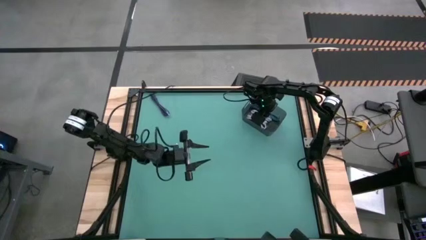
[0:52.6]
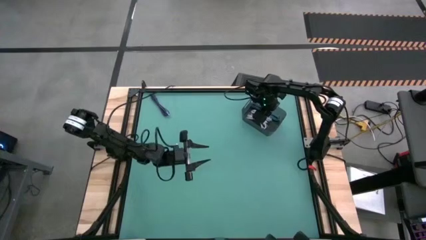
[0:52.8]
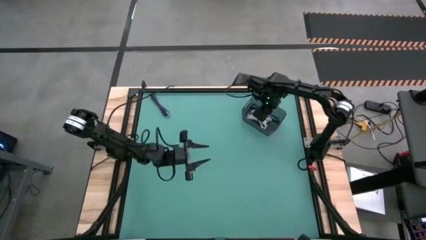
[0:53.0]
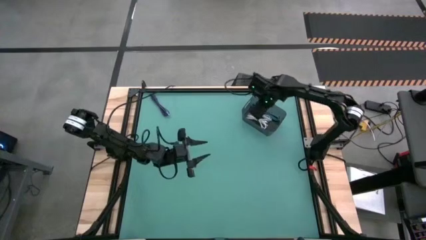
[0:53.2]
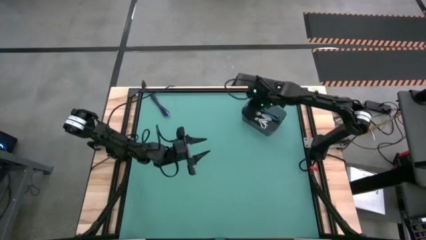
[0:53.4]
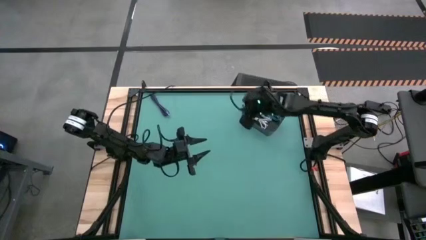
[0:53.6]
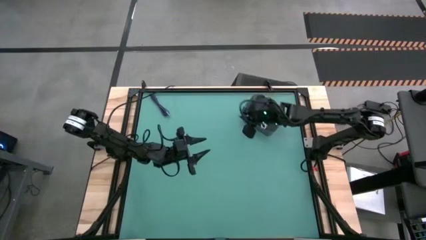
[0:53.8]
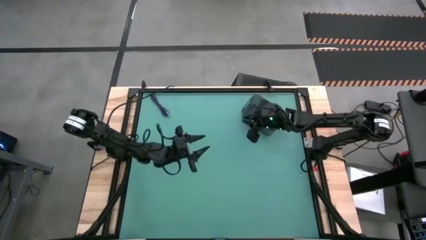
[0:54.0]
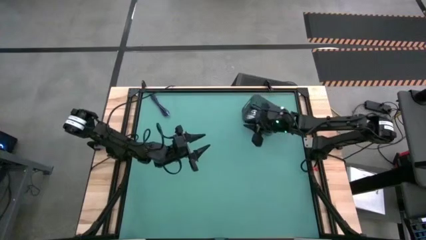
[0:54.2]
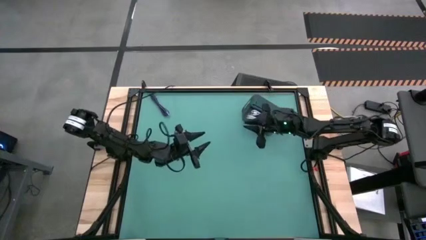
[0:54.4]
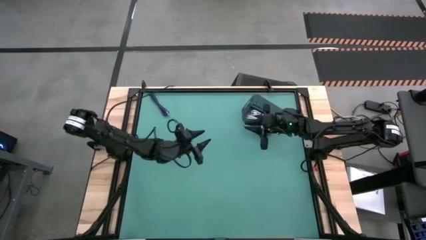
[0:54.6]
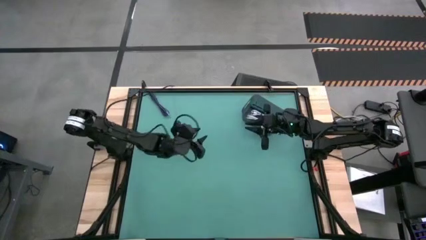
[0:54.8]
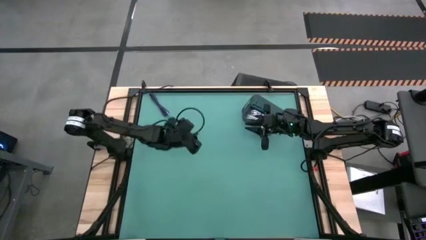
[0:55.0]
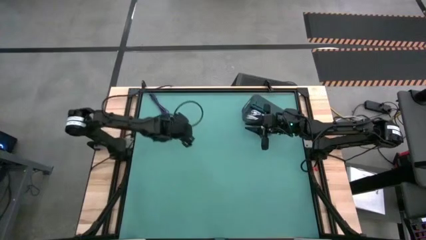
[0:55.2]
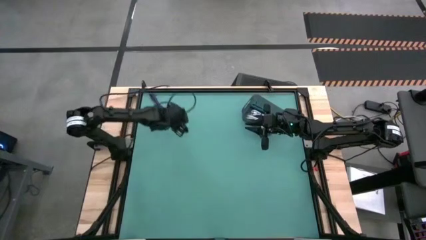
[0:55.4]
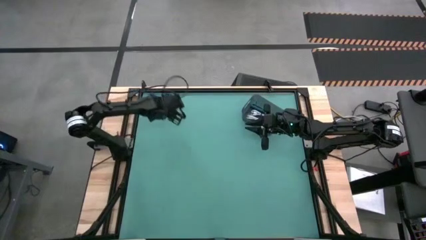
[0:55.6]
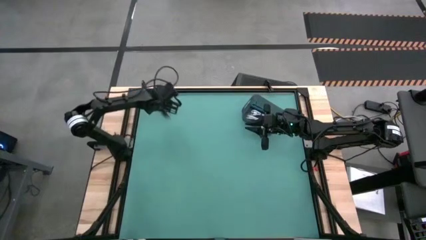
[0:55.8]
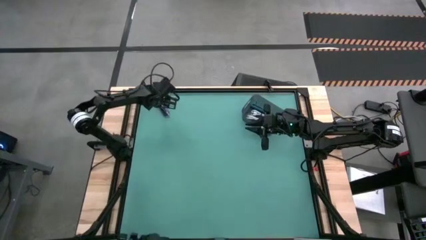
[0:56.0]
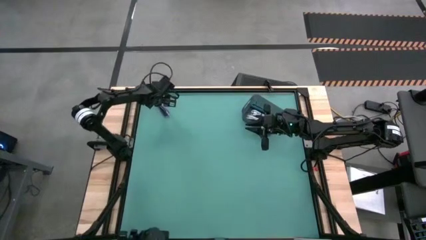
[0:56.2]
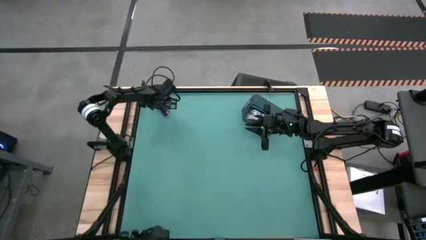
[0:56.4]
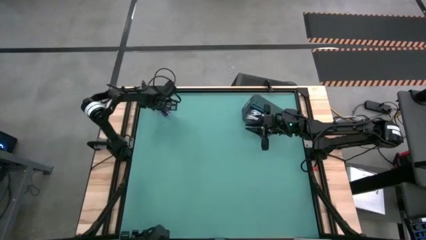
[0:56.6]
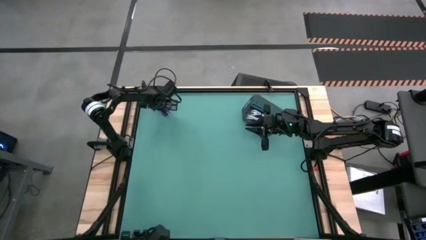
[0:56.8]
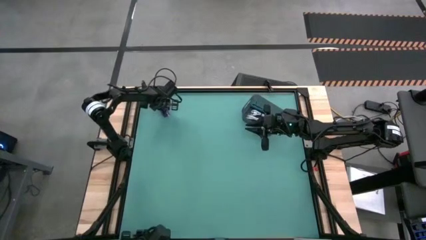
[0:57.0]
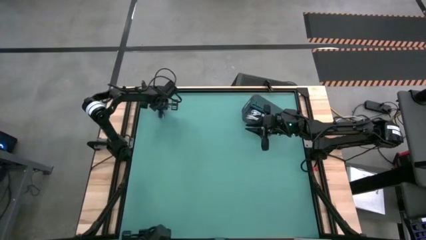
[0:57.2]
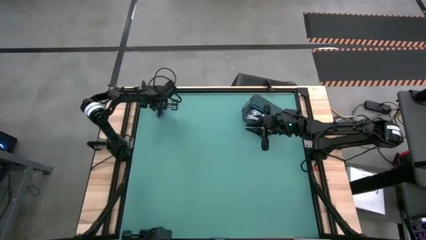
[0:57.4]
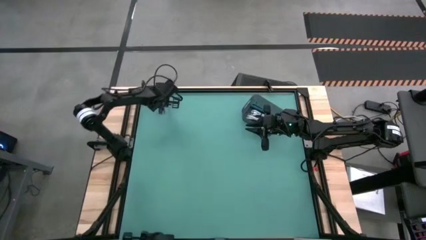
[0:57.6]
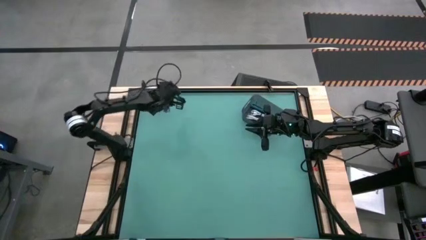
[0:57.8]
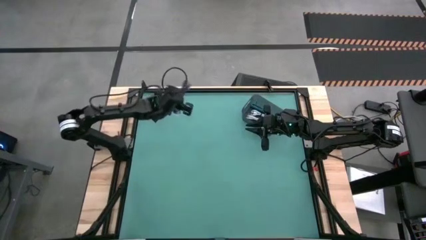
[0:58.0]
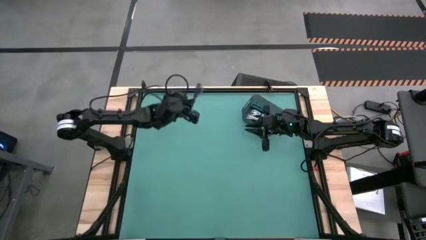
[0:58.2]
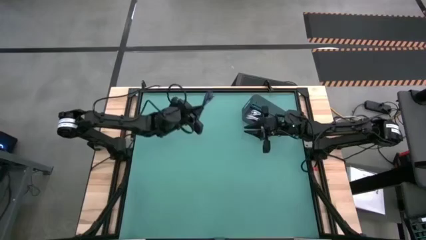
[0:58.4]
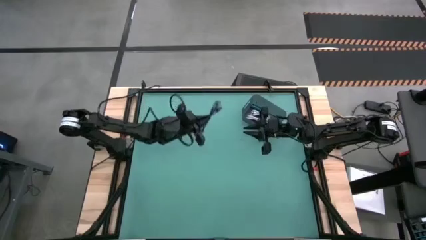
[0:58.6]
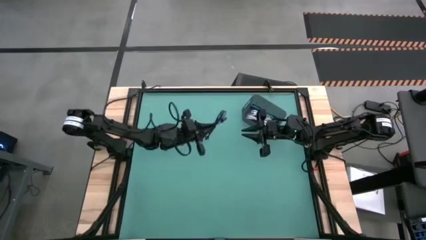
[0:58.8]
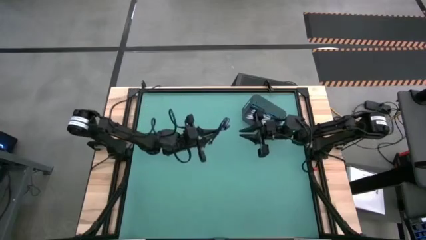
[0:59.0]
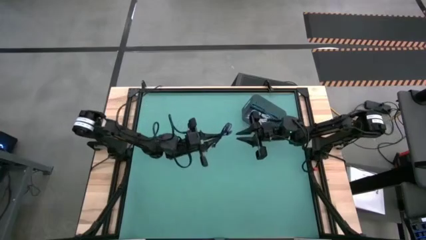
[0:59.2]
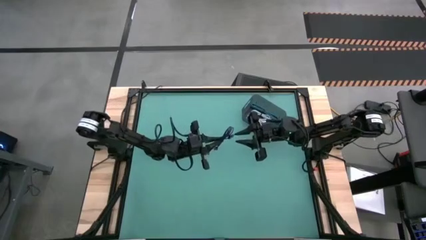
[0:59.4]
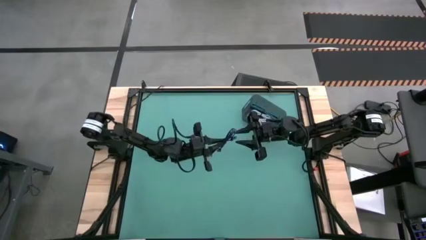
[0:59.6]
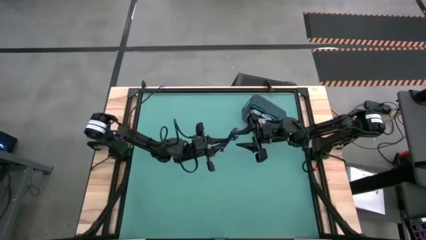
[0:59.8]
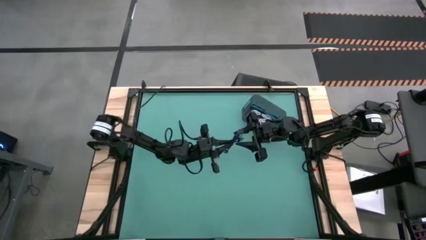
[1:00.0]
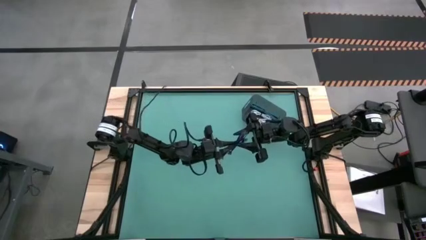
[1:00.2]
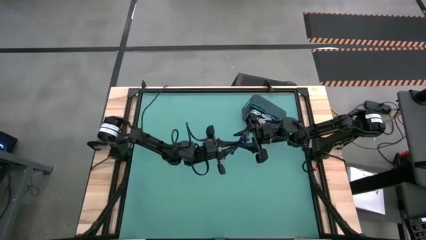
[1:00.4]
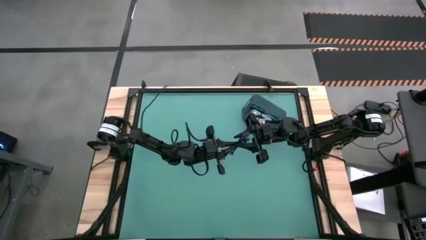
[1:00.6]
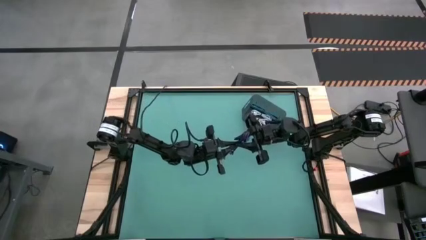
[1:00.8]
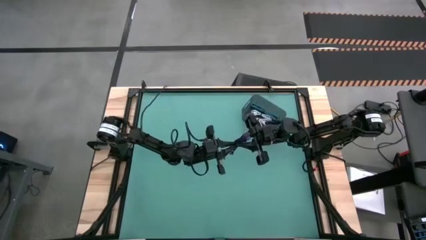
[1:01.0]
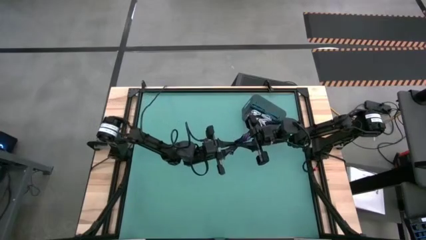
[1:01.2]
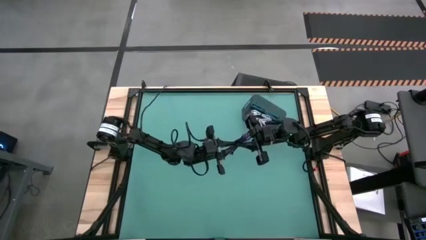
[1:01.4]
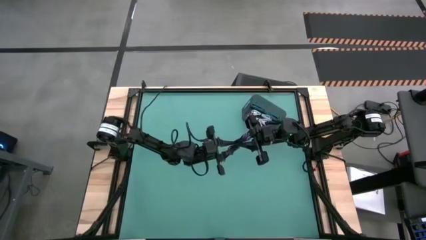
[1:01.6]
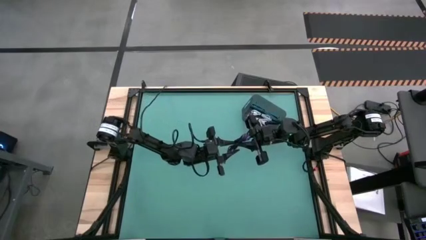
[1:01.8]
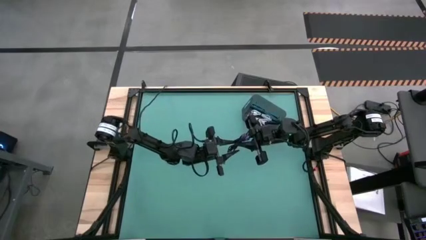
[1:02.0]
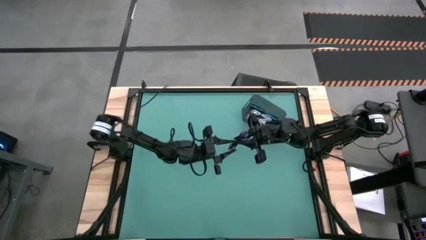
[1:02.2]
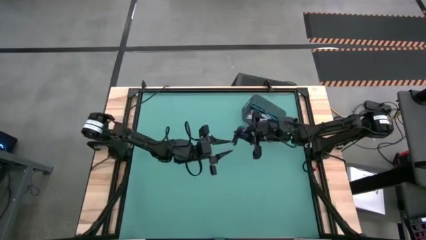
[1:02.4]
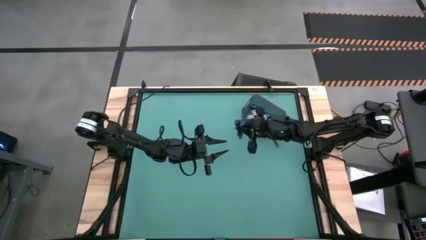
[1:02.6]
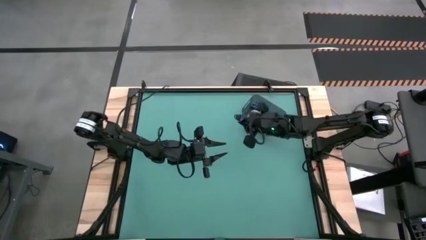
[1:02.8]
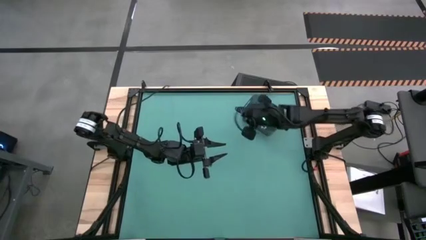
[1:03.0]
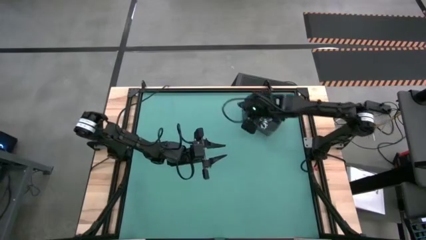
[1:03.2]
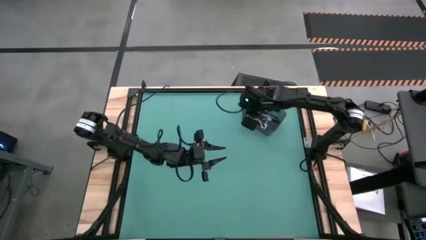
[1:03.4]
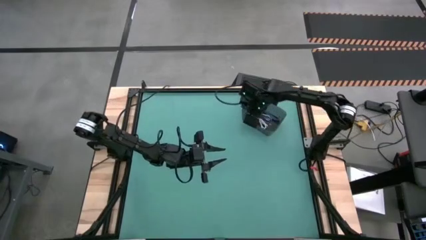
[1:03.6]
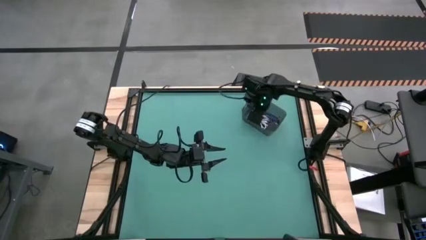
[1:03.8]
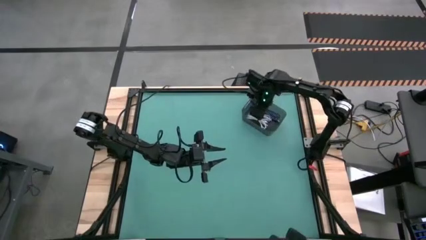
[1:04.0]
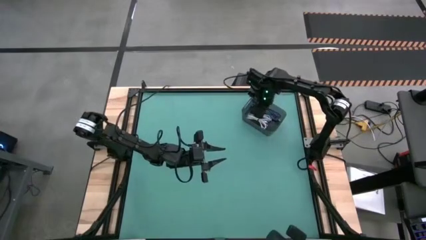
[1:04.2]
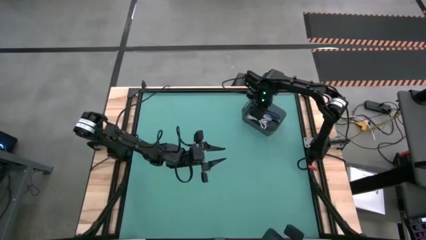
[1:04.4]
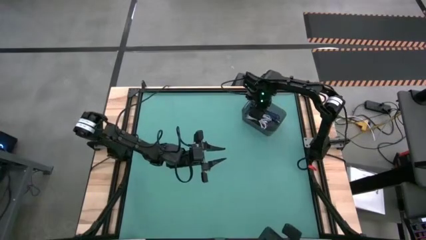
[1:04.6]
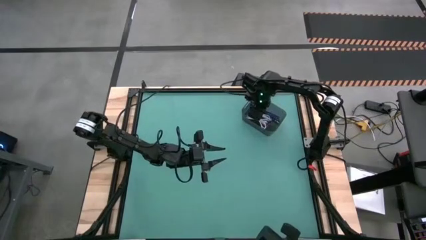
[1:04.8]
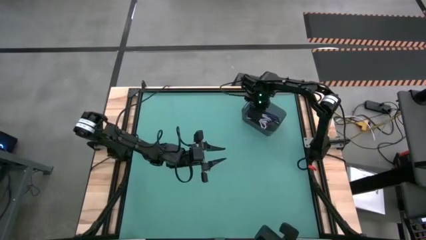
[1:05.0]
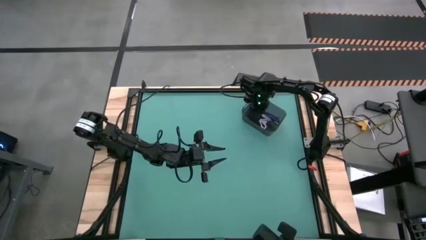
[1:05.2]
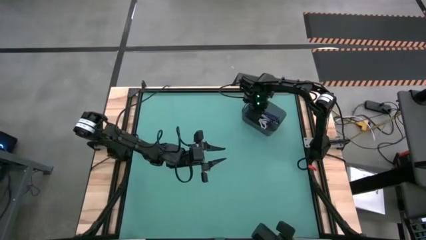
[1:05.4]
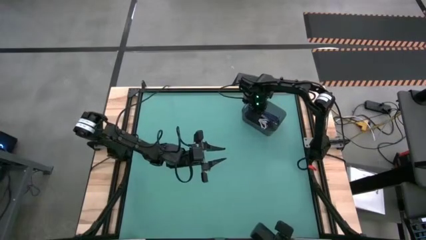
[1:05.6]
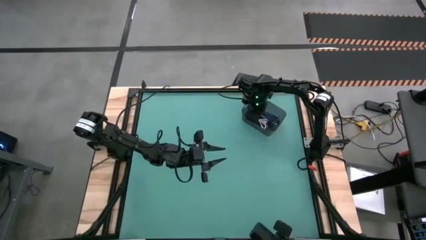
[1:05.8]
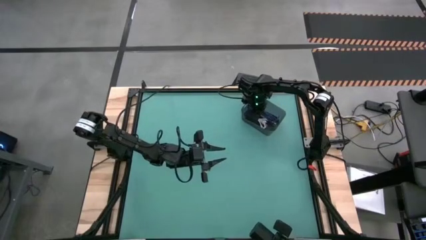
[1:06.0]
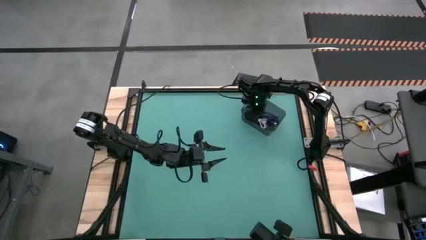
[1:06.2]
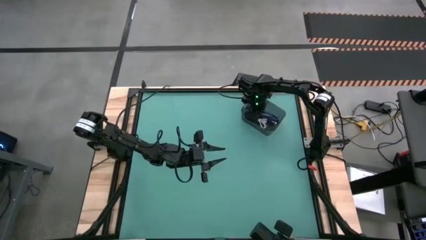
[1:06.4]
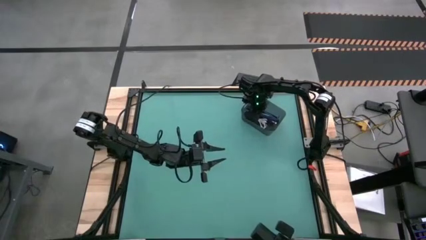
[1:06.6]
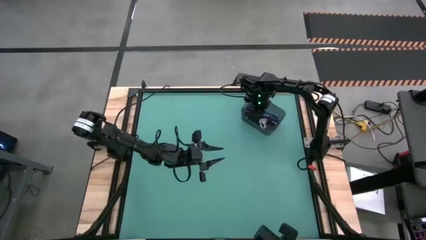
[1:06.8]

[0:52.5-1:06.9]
Task: Pick and place USB-C Cables
Put the violet charger cable into the black container

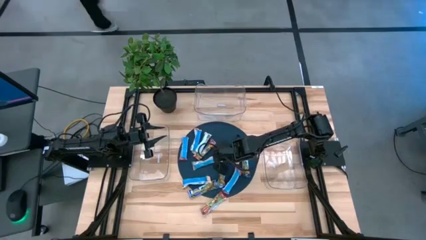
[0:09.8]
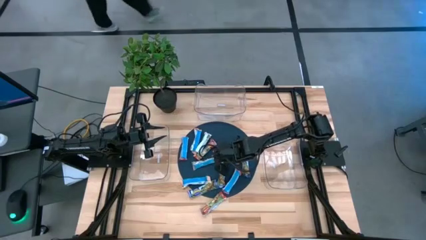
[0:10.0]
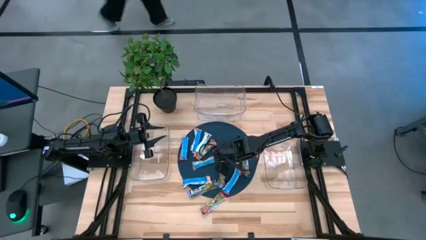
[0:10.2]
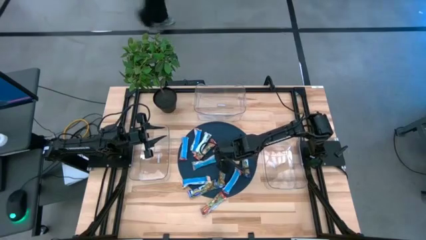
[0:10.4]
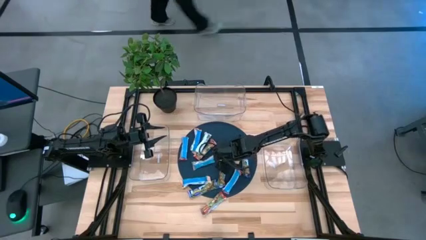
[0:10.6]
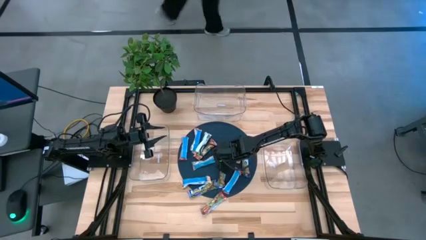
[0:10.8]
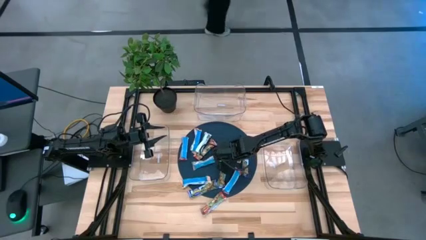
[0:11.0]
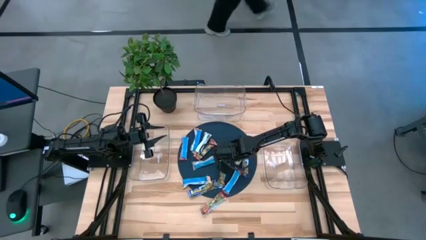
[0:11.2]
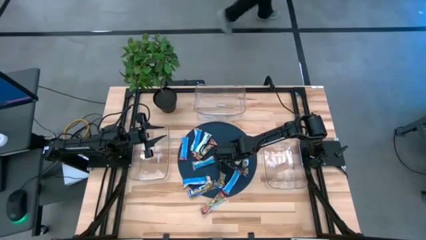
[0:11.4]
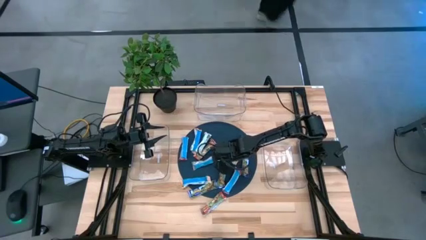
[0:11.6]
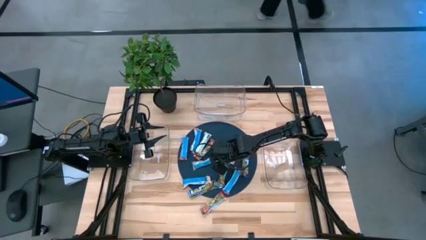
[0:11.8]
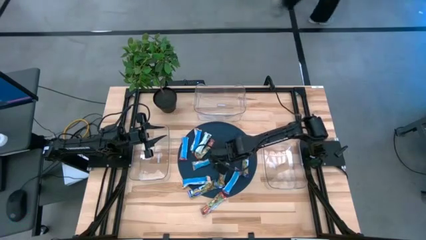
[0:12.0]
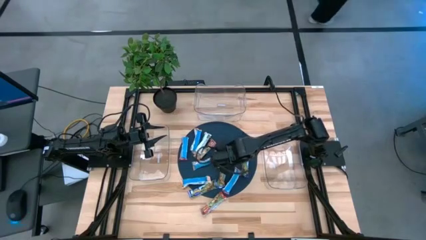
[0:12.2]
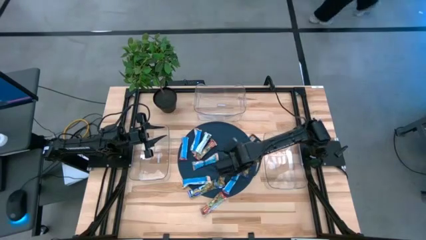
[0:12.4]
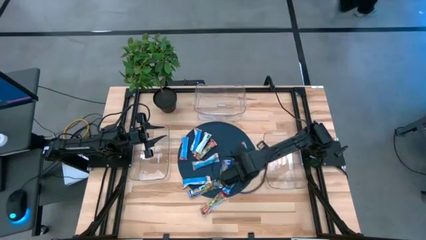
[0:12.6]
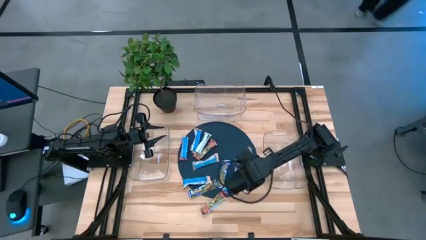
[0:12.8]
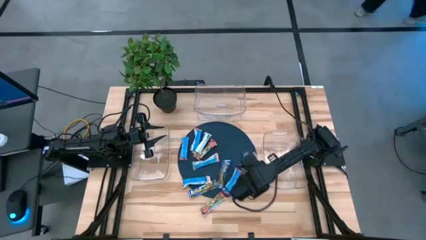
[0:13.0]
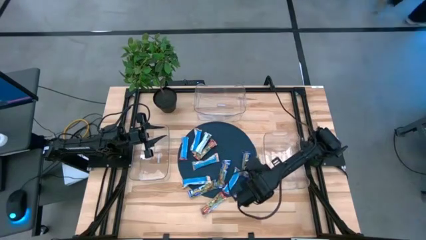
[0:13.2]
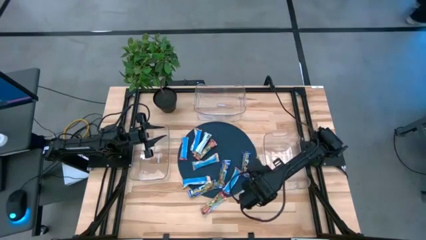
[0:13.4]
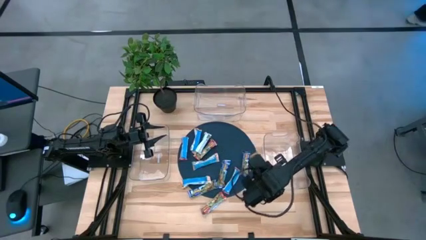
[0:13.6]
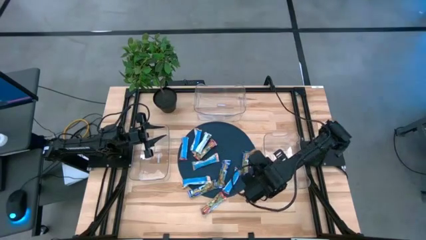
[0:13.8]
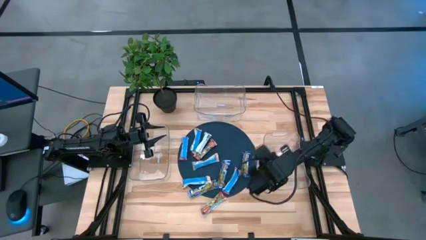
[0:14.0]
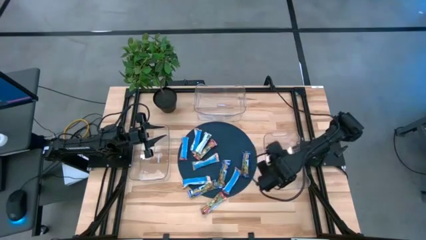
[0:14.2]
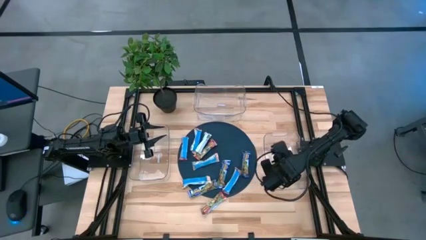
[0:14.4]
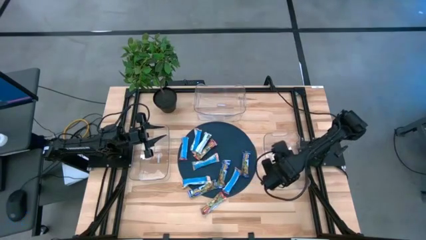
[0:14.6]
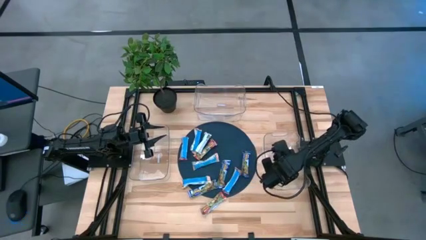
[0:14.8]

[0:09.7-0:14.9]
Task: Pick and place Granola Bars by type
Put the orange granola bar into the right transparent bin
